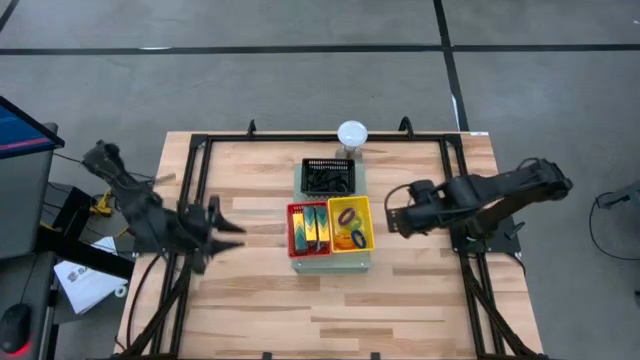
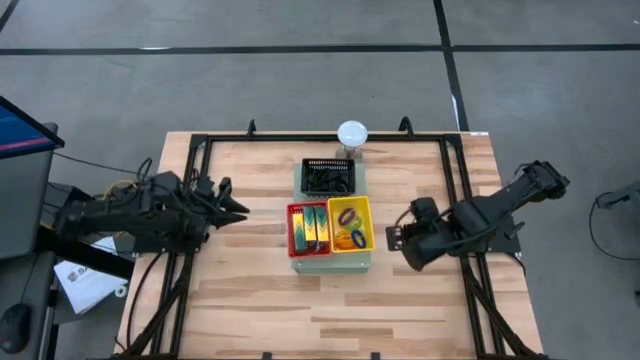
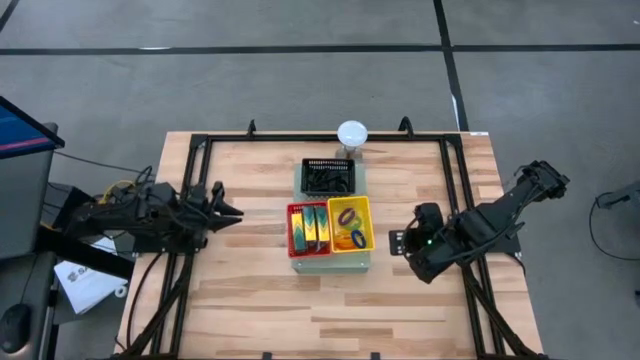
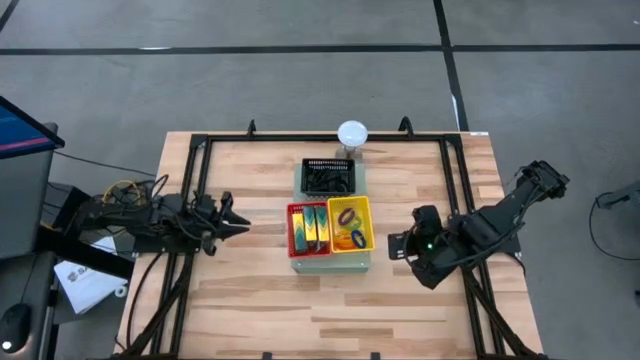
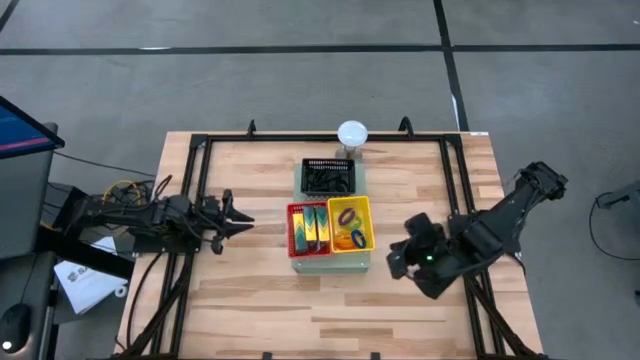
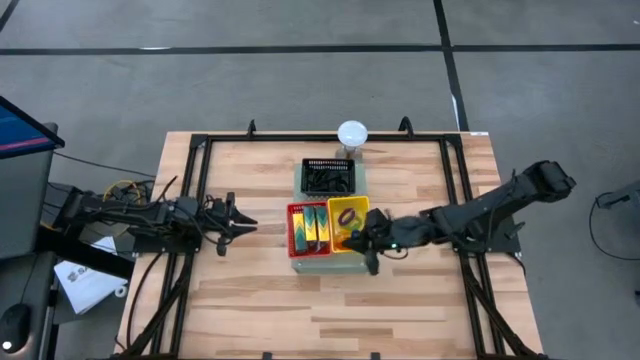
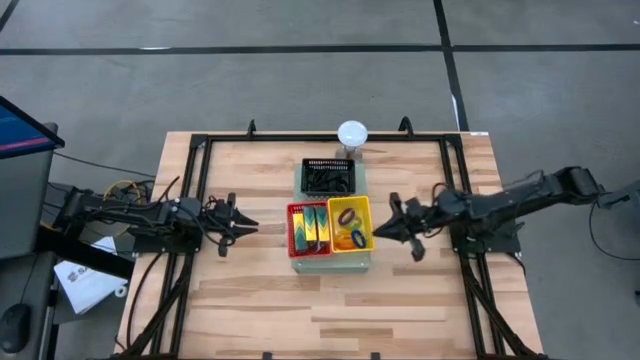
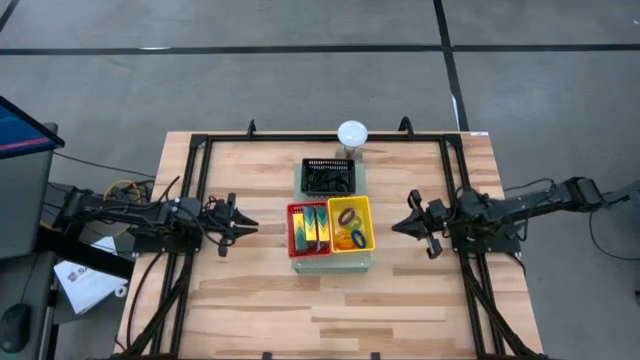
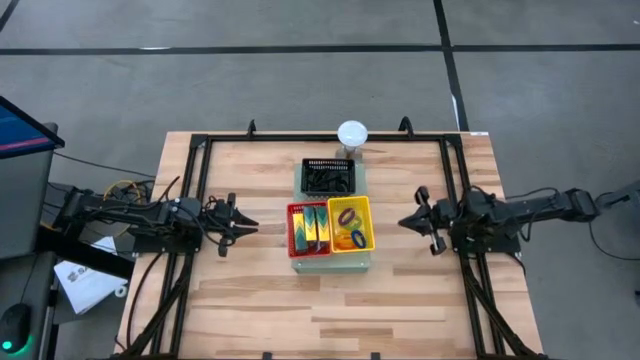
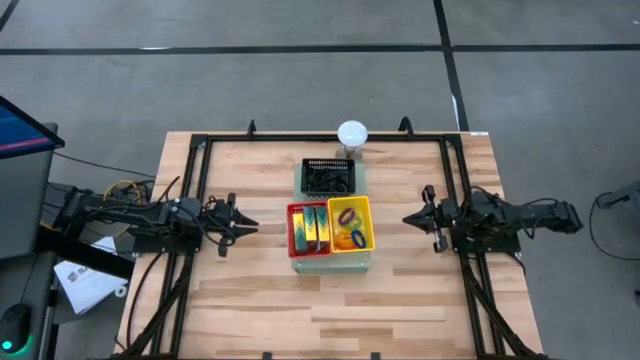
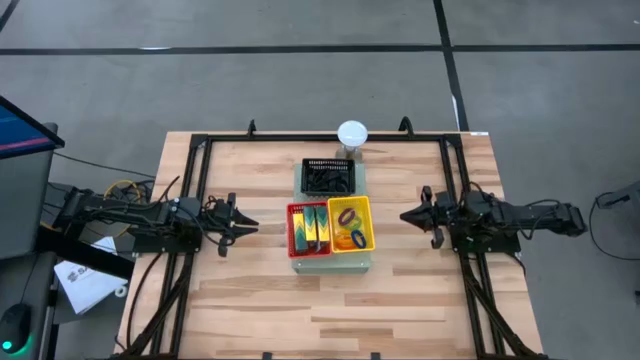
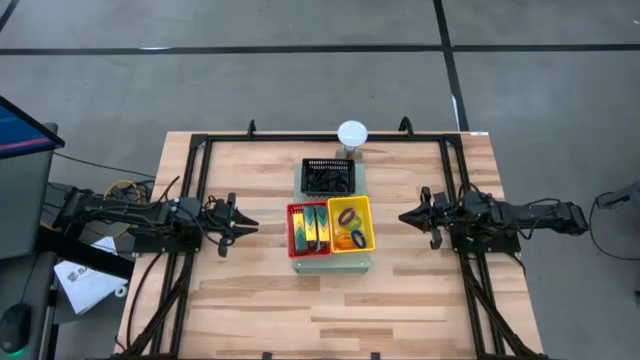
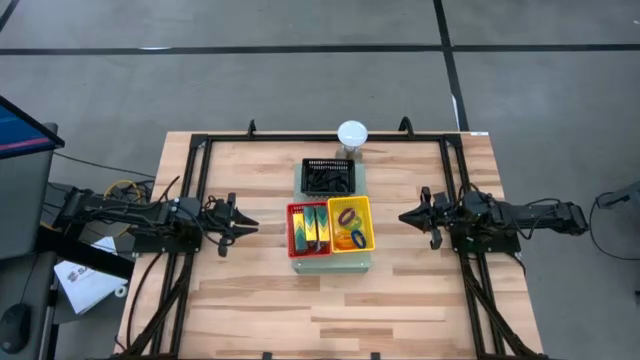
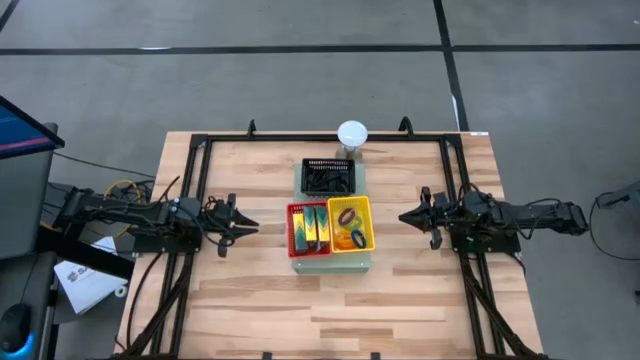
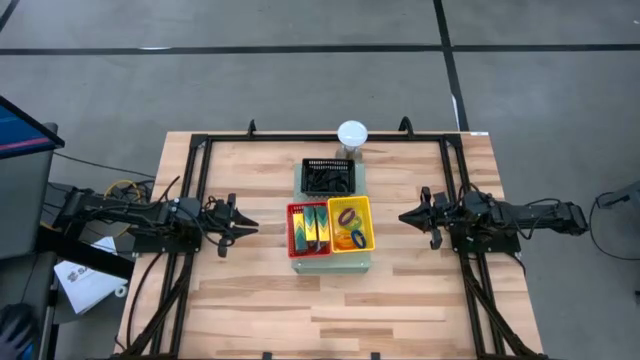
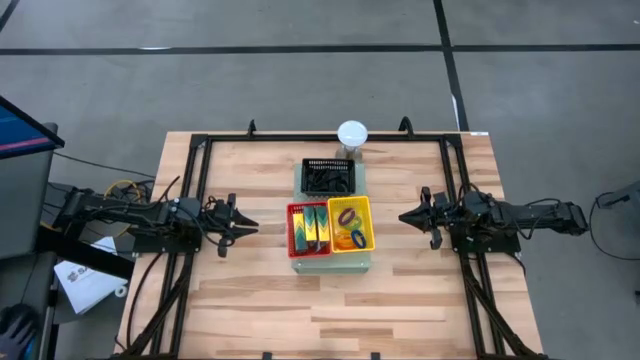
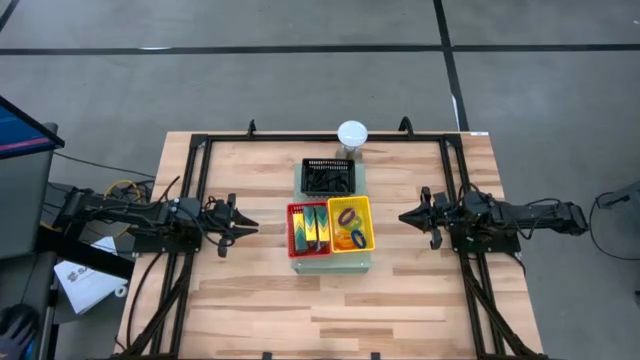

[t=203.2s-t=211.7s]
Task: Pick & Place Office Desk Supplies
Return to Home Position

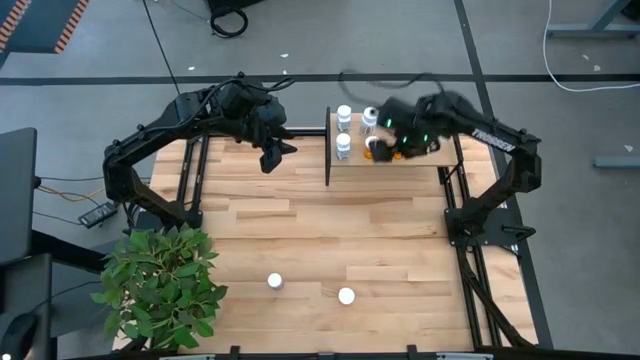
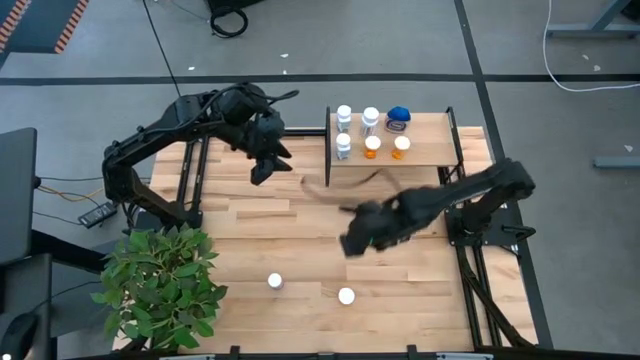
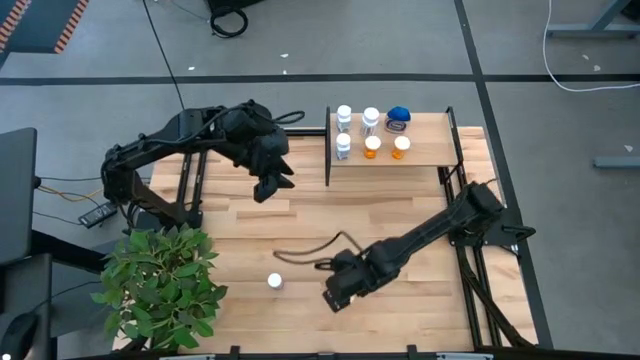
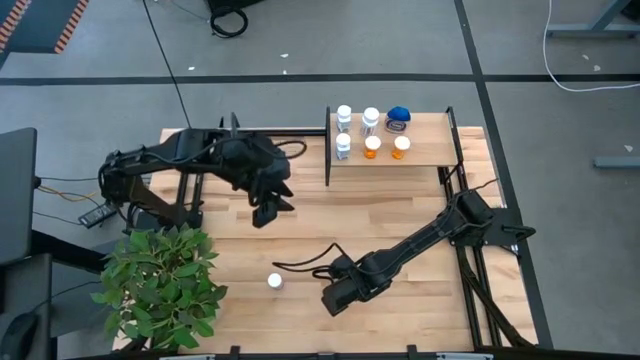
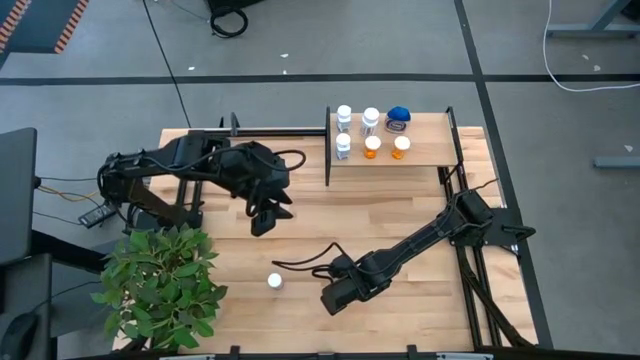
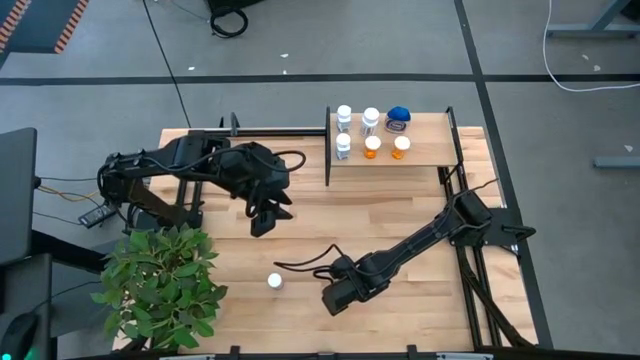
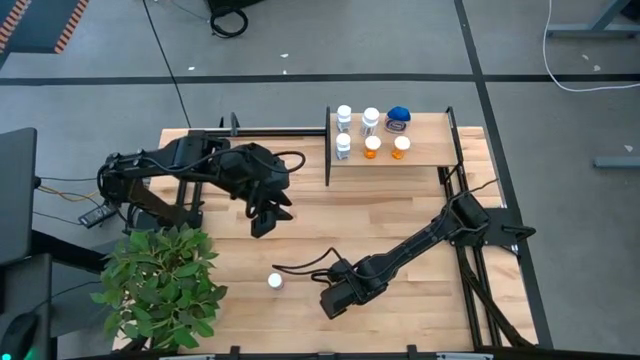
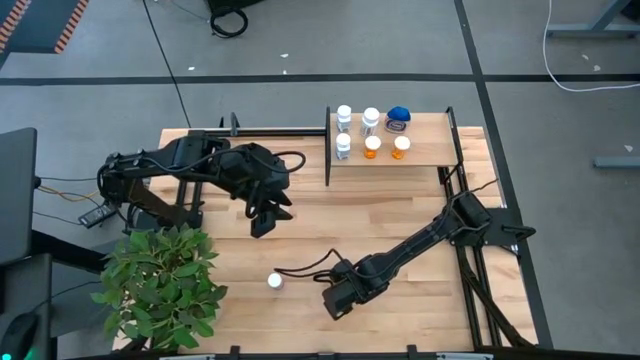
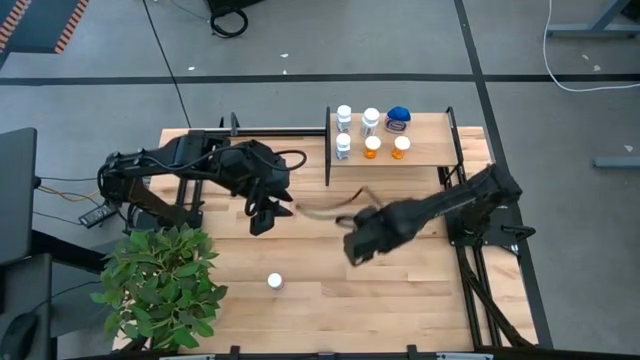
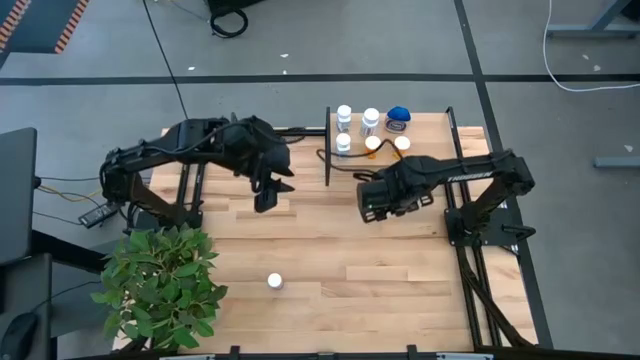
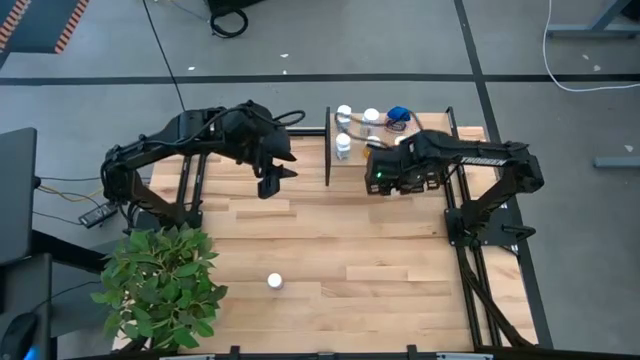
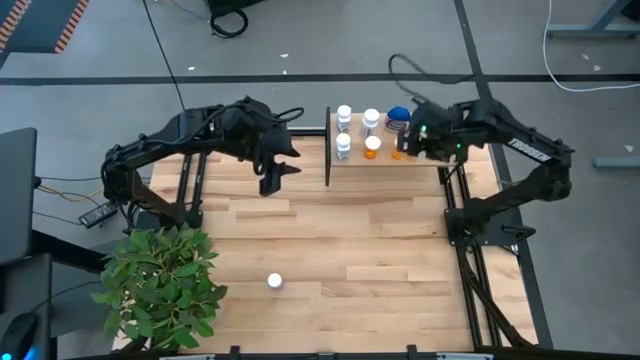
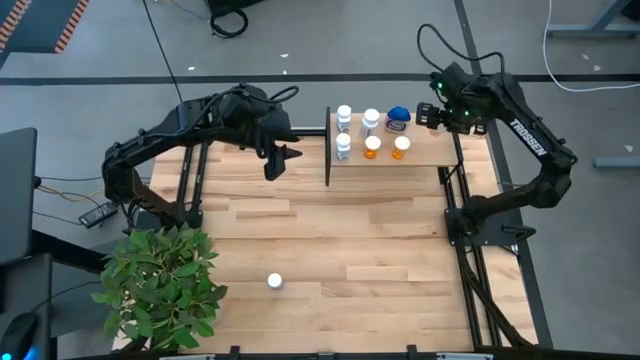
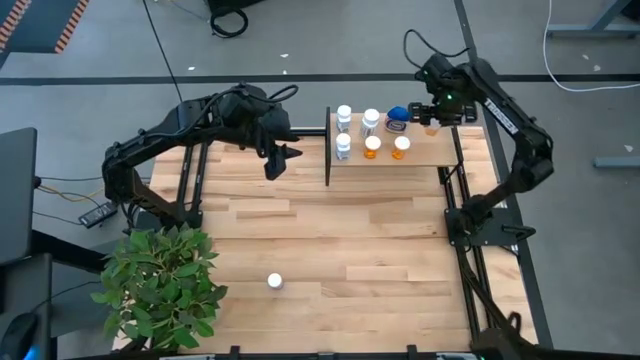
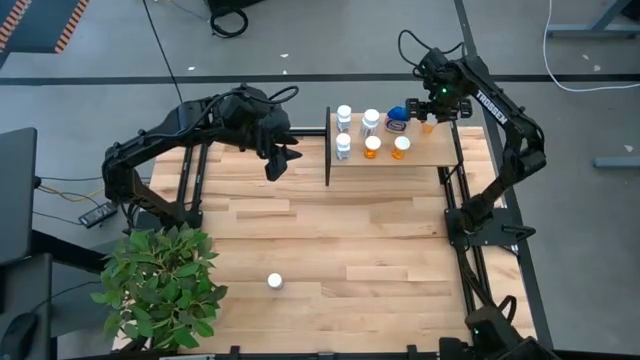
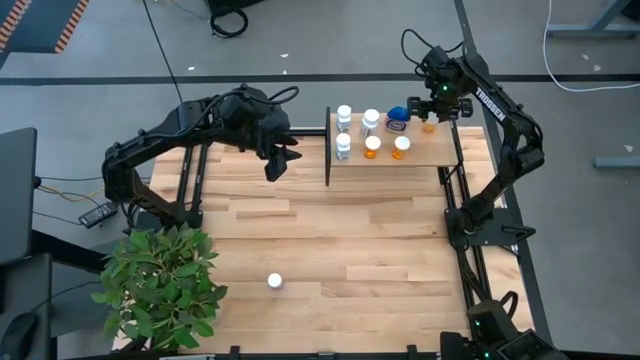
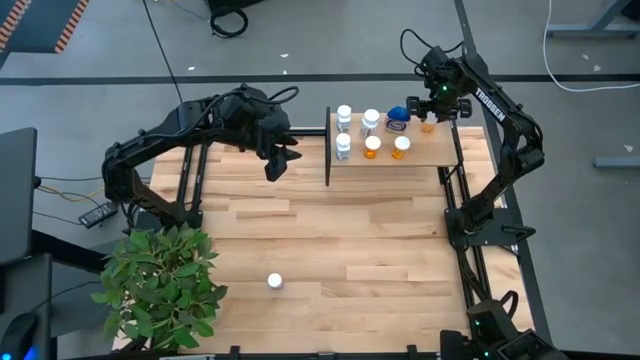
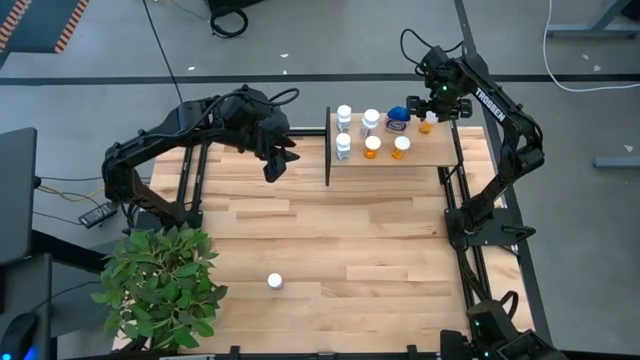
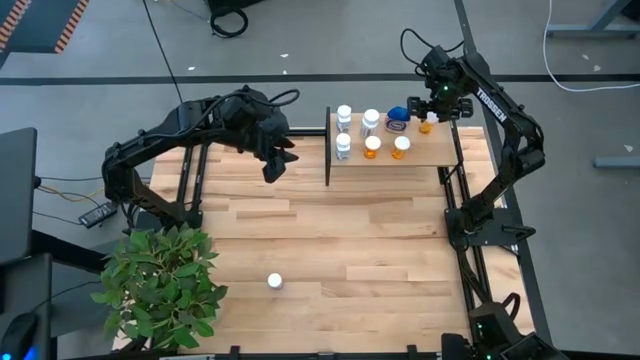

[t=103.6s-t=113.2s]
Task: Pick and place medicine bottles onto shelf by color
Put the orange medicine bottle on the shelf
